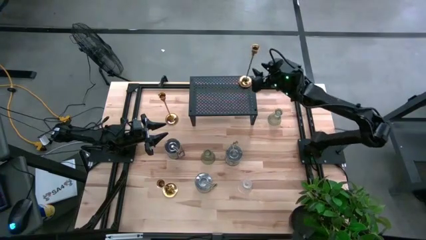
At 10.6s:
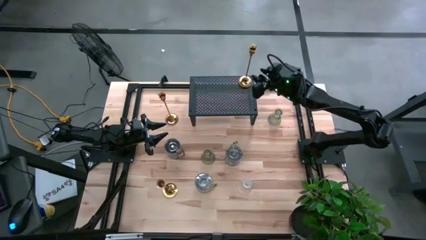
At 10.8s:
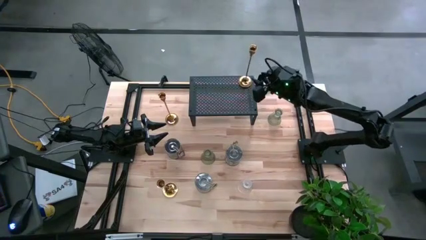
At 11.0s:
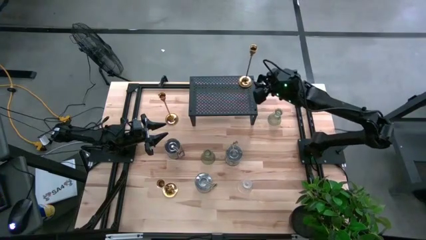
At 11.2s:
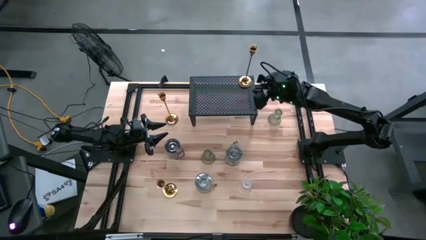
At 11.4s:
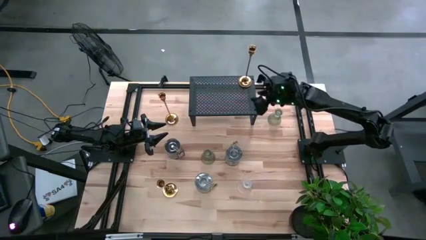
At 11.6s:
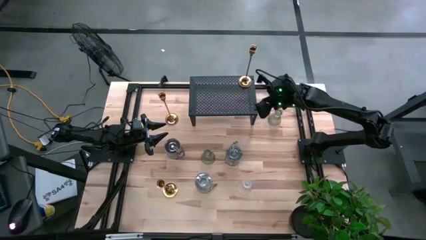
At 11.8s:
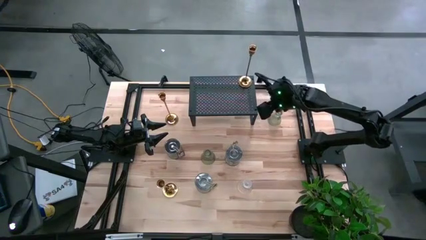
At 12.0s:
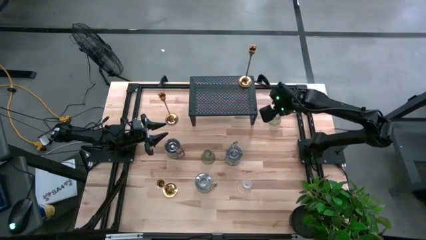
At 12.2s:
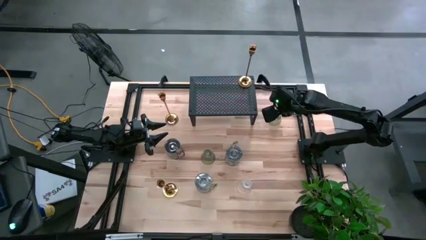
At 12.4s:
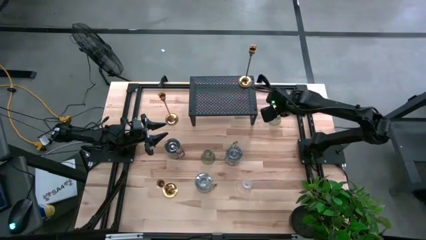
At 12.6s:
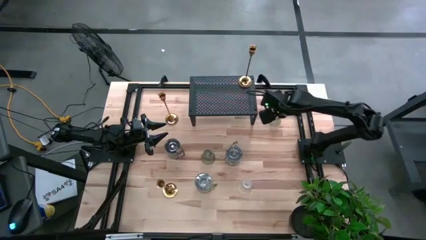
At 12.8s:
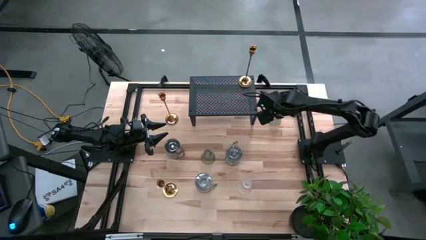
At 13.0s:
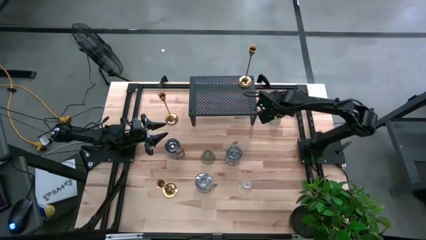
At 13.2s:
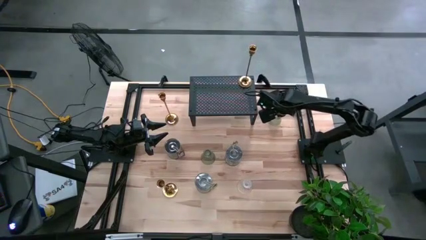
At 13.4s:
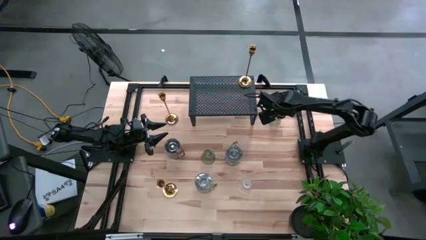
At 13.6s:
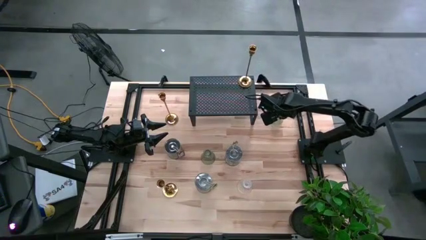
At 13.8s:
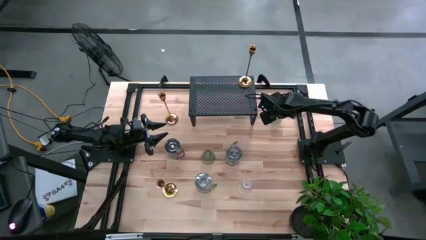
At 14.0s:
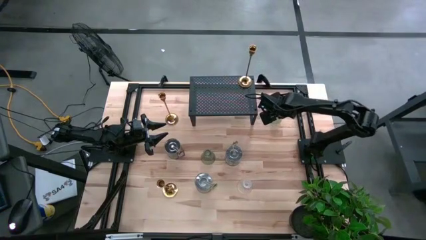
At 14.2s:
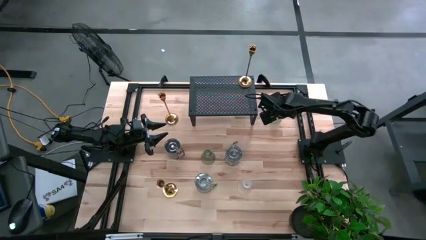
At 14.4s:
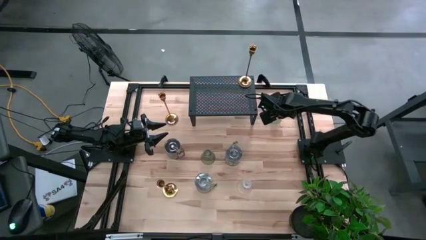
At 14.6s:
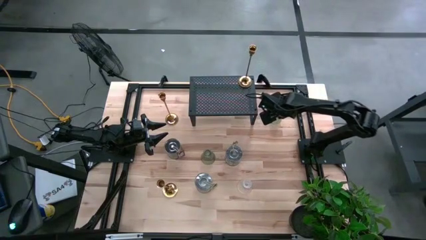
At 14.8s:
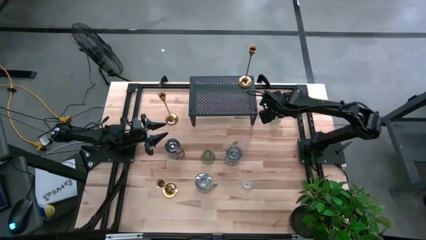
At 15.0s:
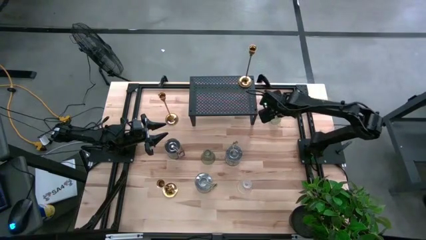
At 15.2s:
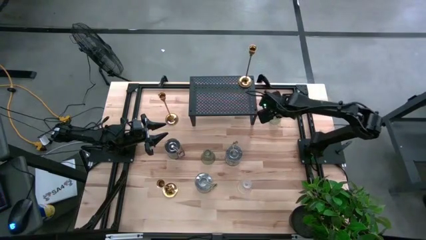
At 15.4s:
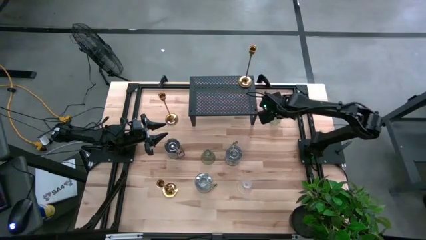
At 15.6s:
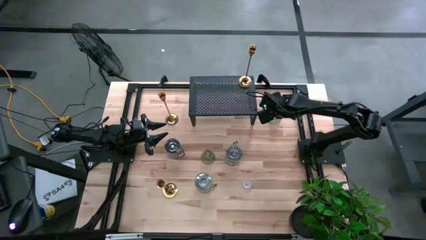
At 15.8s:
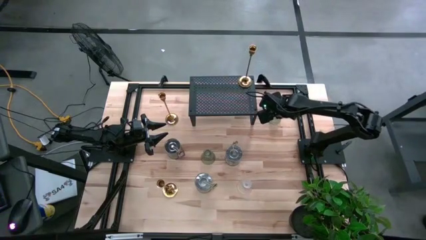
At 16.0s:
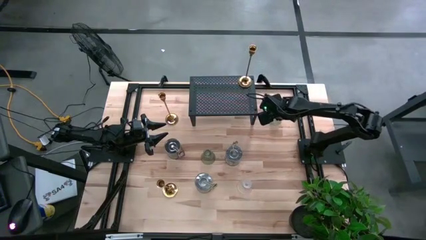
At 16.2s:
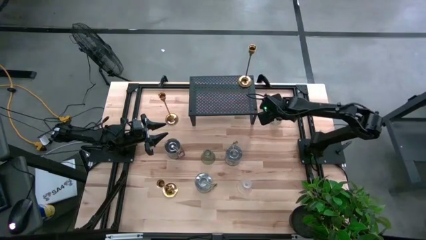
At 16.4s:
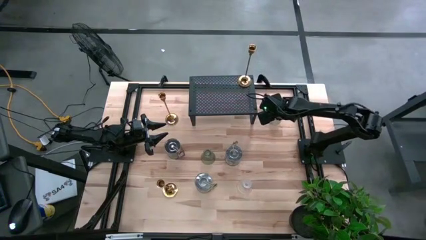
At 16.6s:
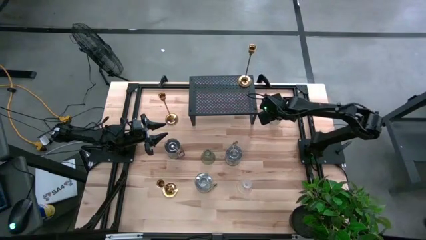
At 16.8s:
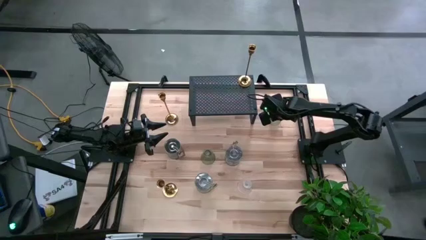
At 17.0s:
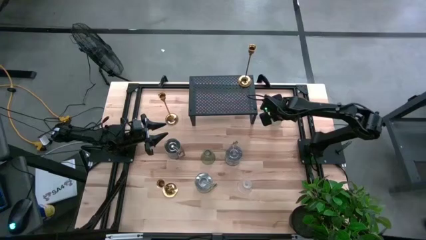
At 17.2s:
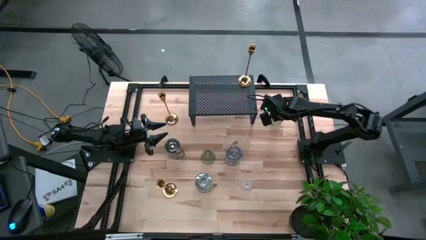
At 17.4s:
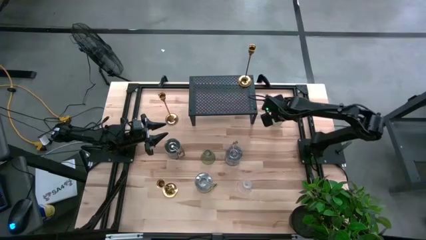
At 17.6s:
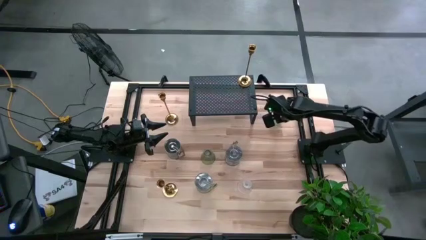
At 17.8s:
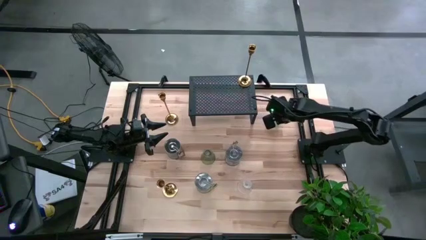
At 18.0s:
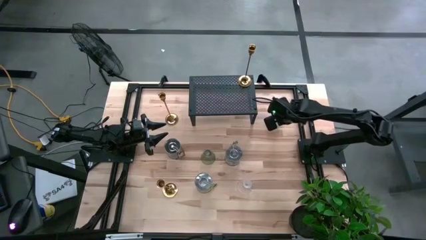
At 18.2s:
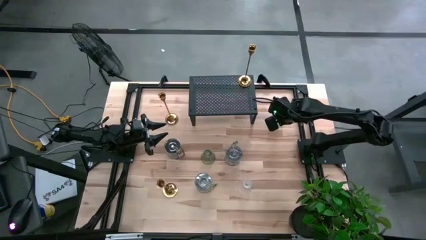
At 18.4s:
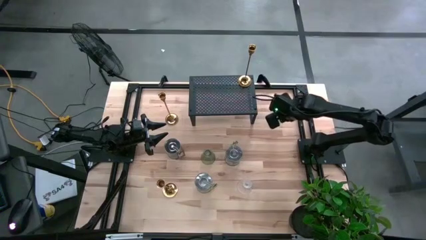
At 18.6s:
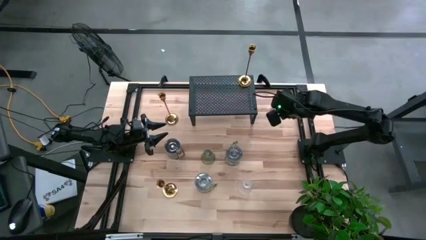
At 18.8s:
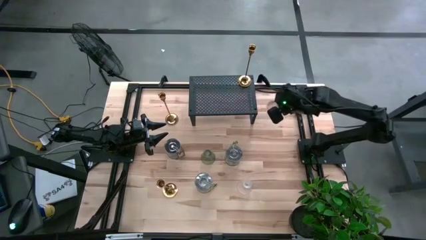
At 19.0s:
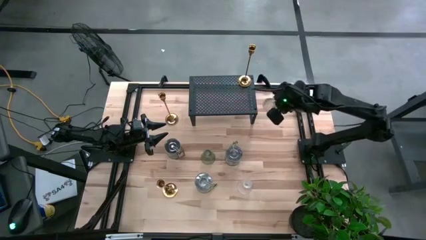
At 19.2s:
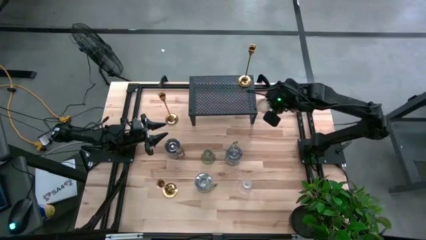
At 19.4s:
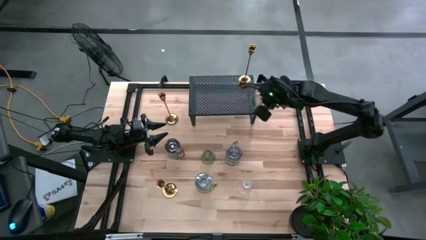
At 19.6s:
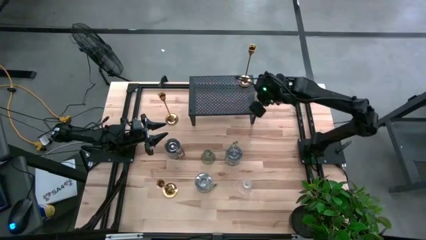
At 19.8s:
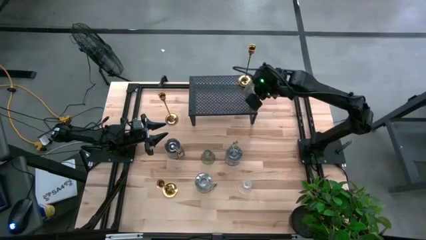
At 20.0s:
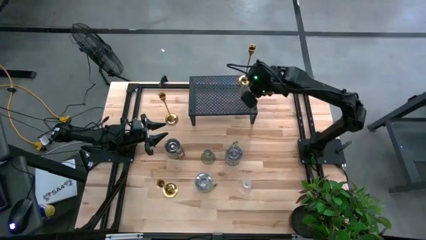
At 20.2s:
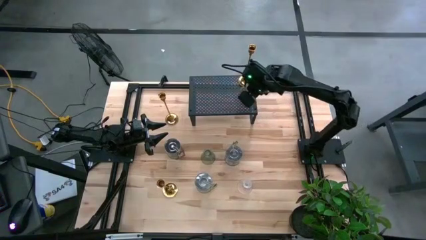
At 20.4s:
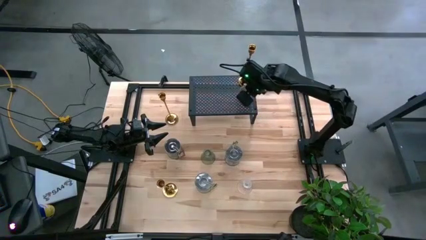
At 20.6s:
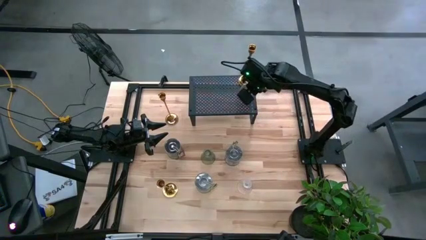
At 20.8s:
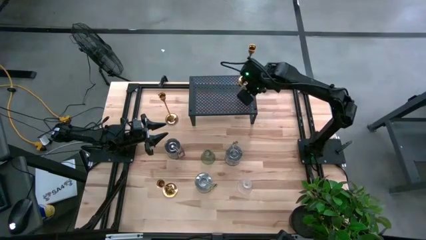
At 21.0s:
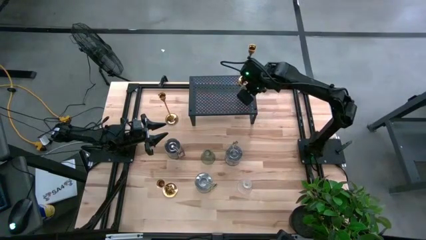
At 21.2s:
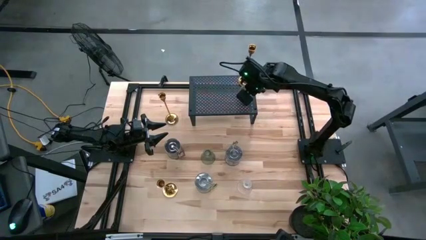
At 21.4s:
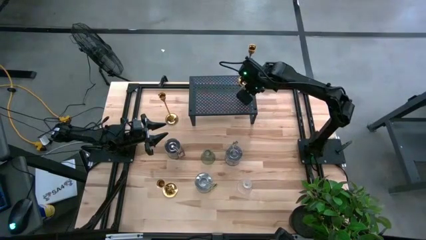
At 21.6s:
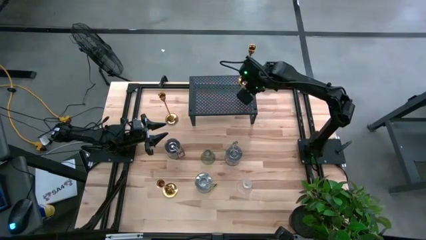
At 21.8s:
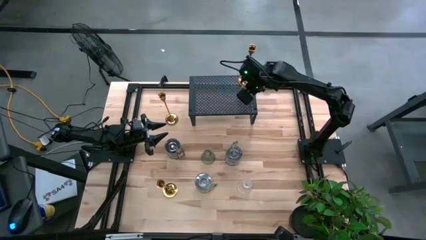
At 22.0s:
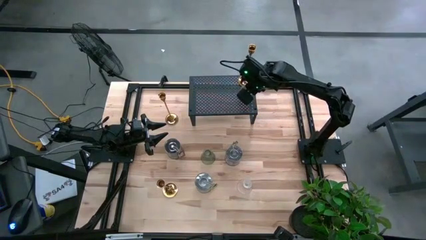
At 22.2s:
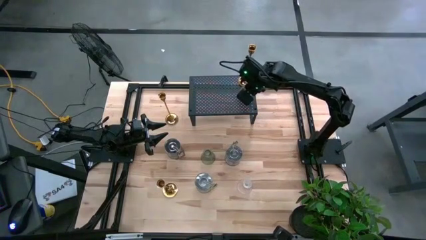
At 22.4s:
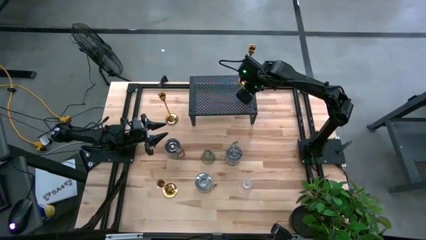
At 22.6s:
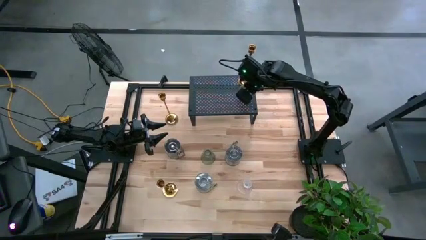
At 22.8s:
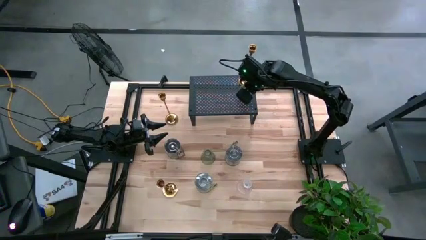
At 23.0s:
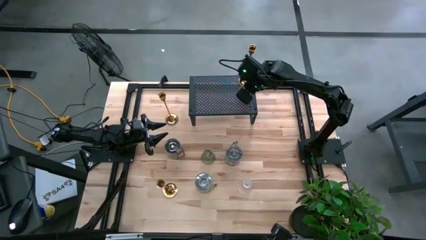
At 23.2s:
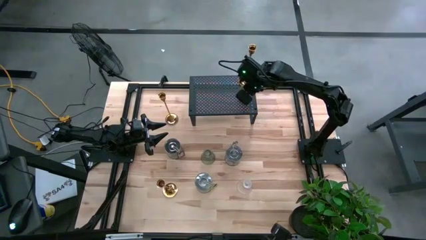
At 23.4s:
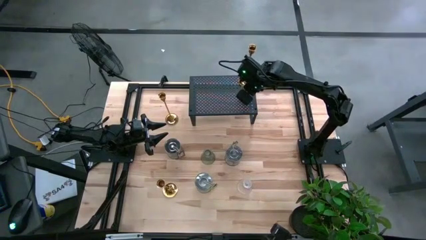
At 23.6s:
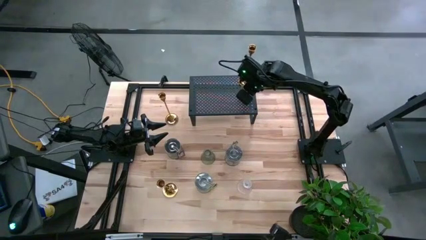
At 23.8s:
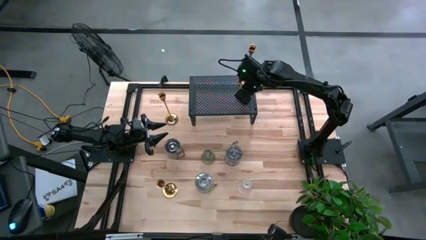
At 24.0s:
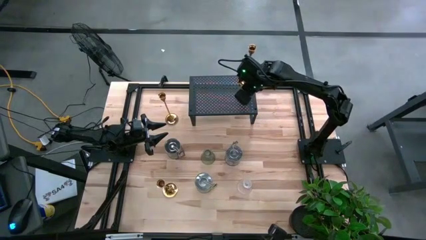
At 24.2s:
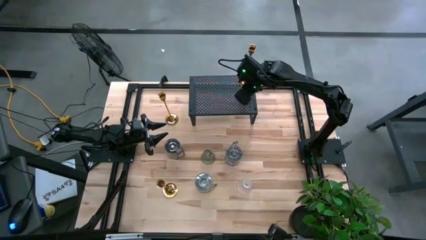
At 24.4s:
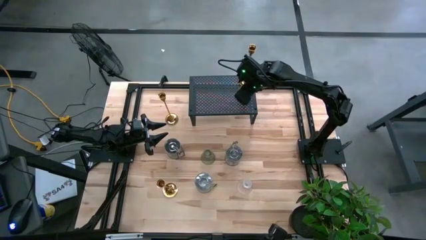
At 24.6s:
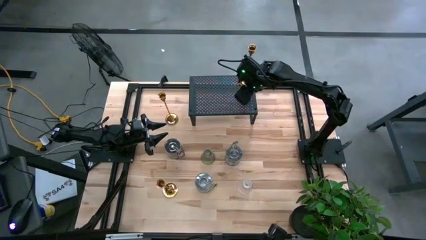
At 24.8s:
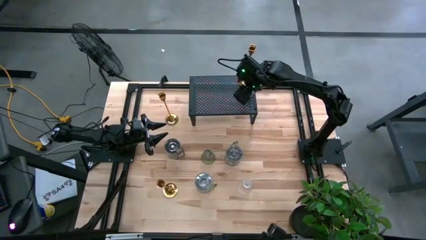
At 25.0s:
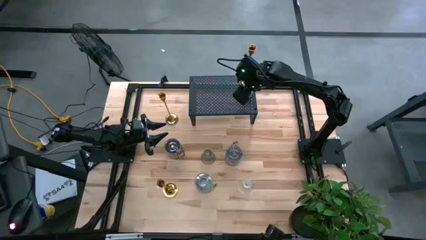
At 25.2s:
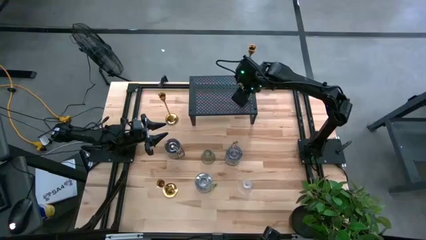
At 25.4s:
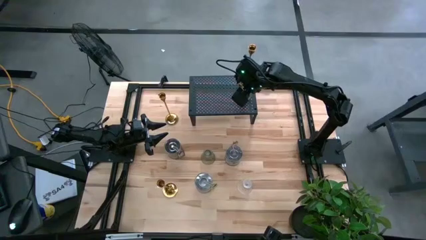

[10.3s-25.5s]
Task: Pick & Place candle stick holders
Put the top green candle holder on the shelf
